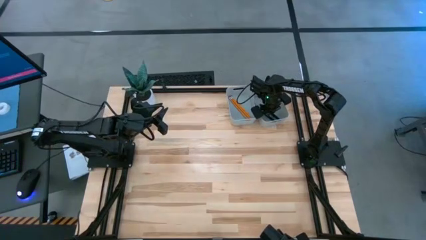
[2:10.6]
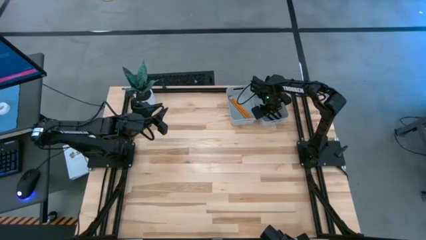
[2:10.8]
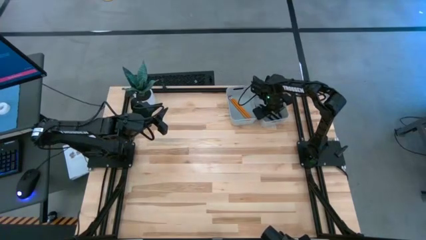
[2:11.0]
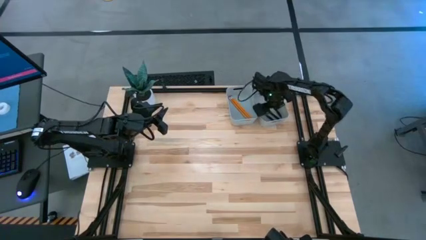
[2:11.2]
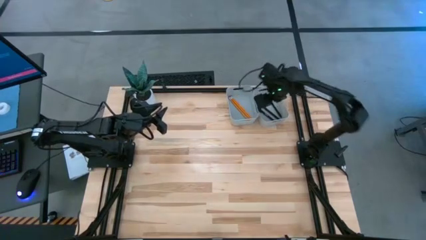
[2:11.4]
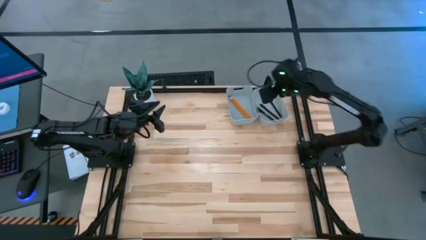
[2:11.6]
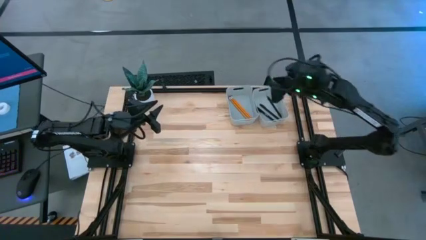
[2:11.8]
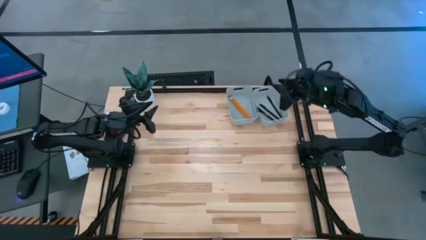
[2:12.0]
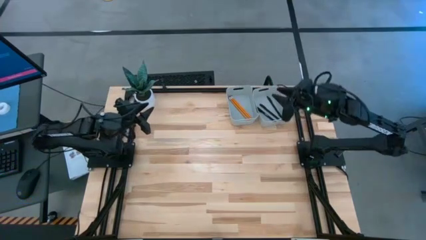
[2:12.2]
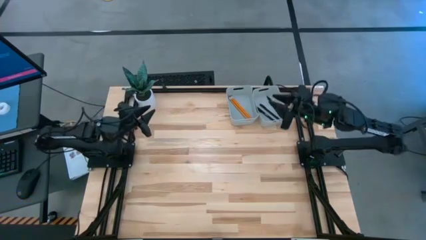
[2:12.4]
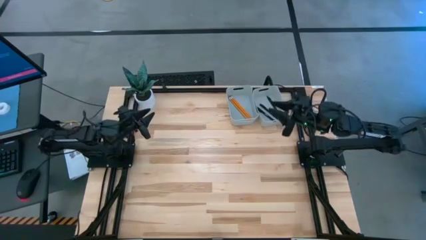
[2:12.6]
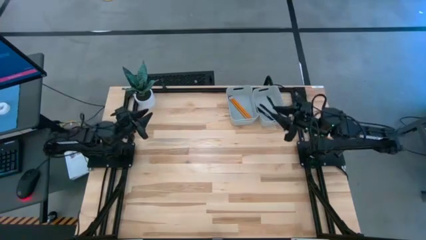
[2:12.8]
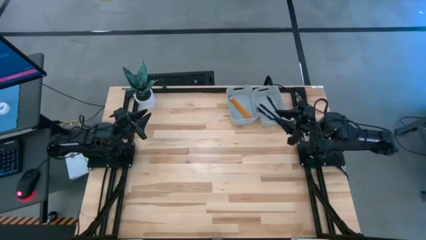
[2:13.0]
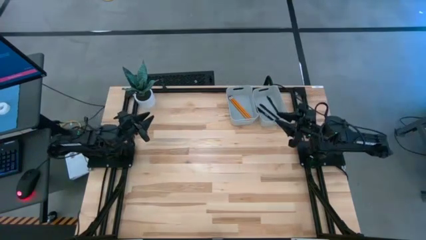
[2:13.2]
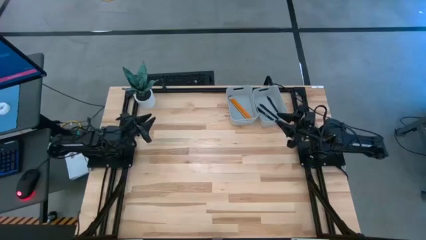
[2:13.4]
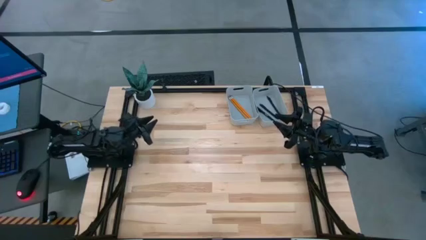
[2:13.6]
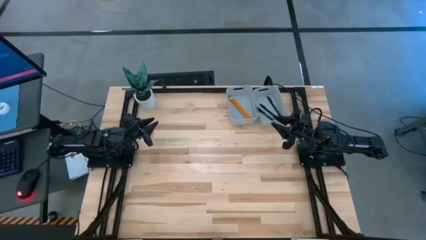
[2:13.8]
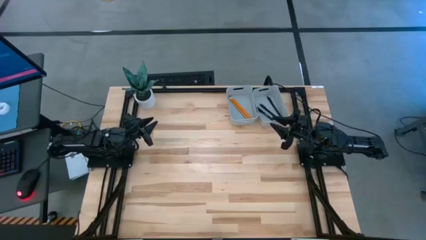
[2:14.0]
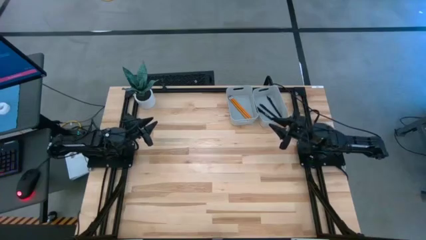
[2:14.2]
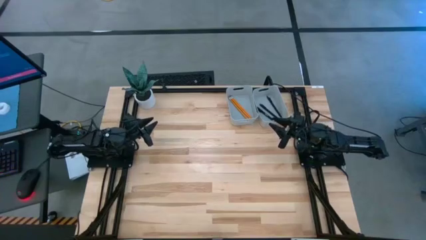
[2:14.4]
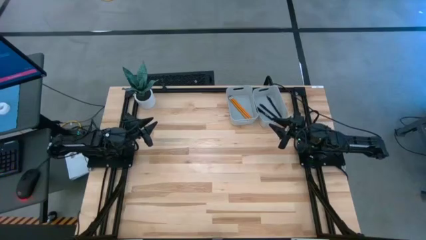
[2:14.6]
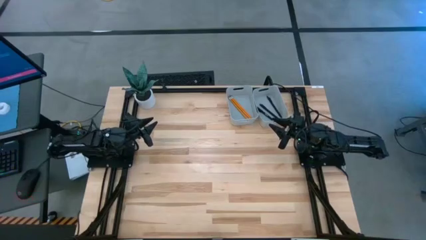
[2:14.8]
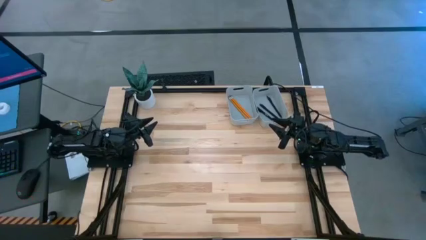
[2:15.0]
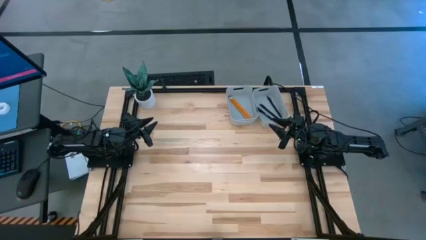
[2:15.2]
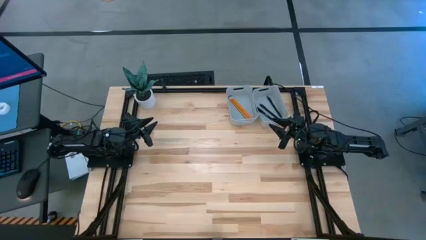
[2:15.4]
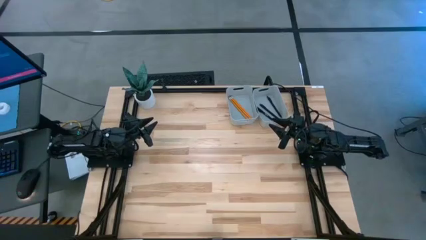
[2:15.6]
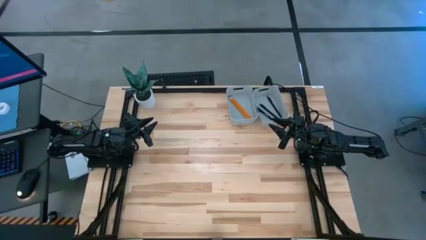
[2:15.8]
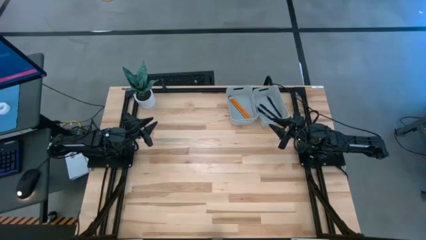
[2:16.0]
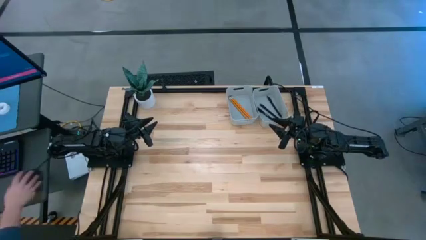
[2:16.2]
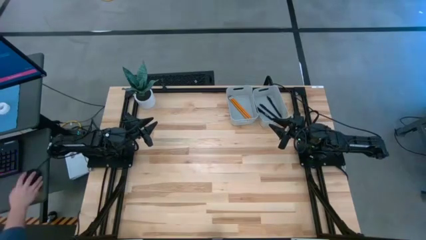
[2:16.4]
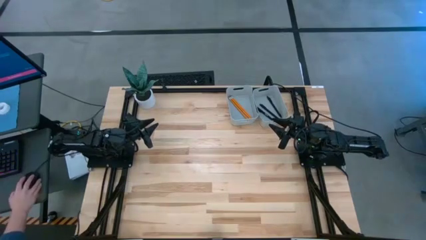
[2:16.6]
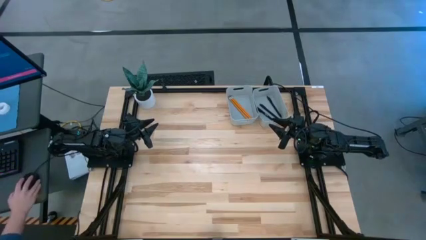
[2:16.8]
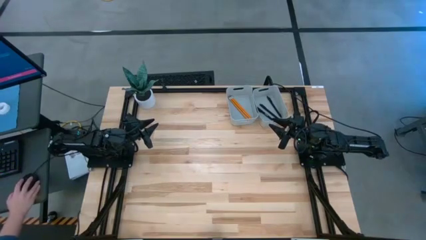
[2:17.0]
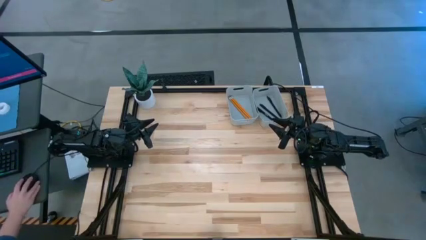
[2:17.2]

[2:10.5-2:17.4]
Task: Sort pens & pencils
Return to Home Position

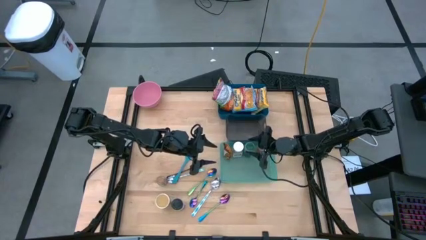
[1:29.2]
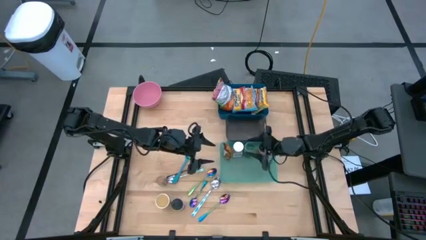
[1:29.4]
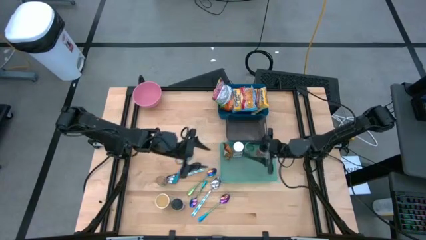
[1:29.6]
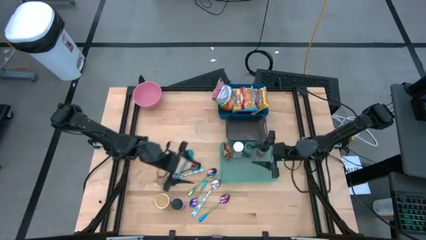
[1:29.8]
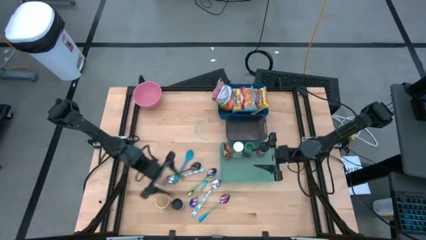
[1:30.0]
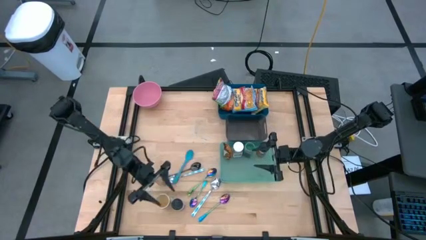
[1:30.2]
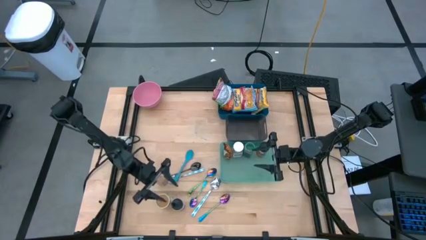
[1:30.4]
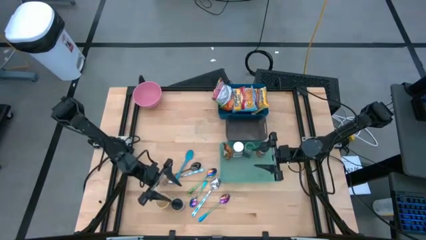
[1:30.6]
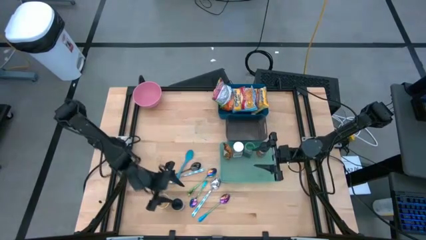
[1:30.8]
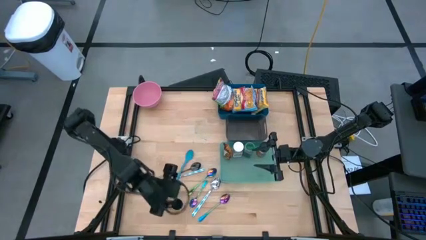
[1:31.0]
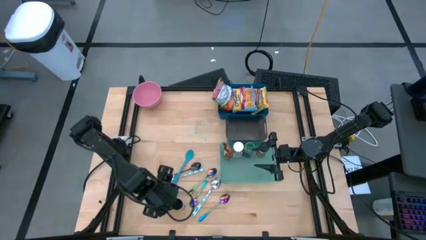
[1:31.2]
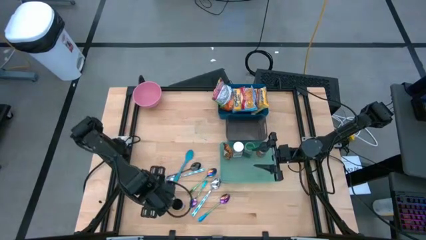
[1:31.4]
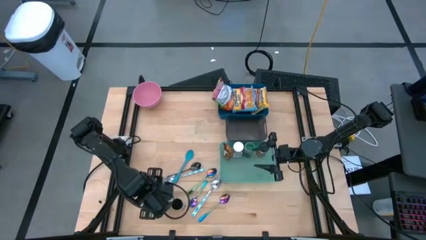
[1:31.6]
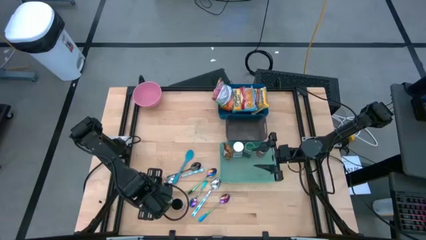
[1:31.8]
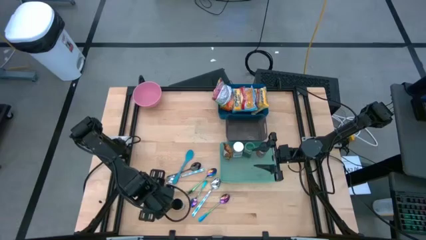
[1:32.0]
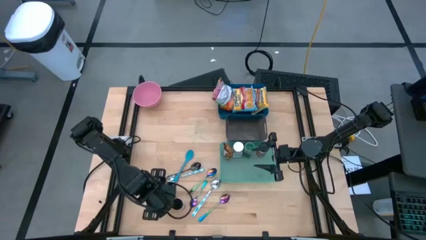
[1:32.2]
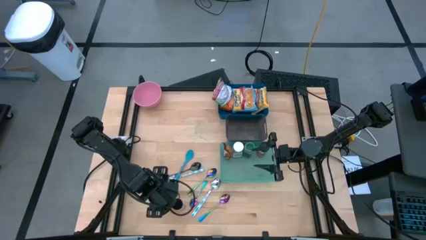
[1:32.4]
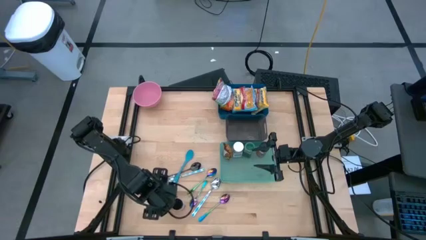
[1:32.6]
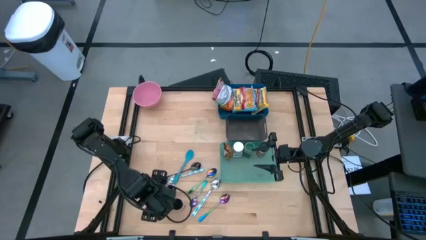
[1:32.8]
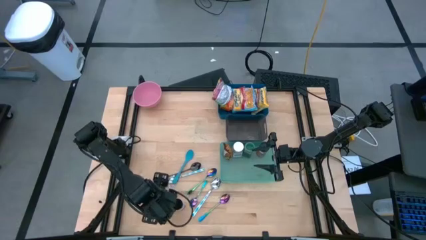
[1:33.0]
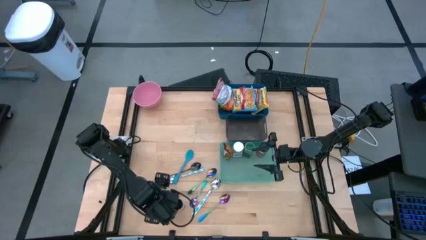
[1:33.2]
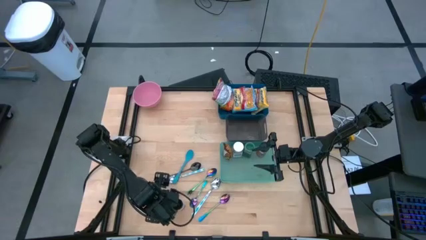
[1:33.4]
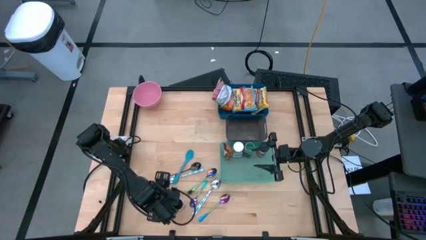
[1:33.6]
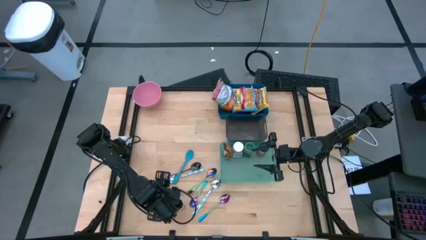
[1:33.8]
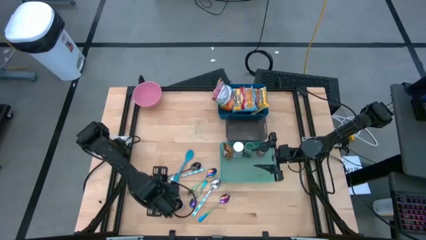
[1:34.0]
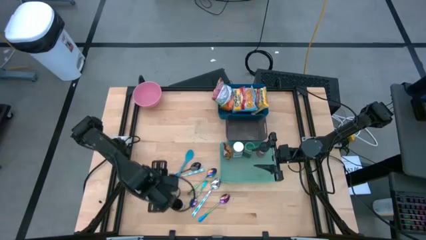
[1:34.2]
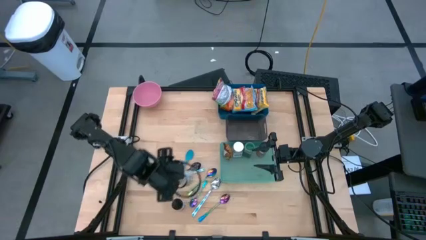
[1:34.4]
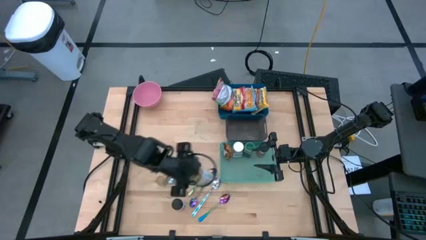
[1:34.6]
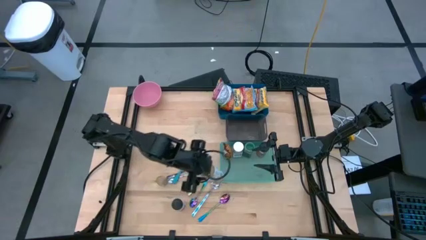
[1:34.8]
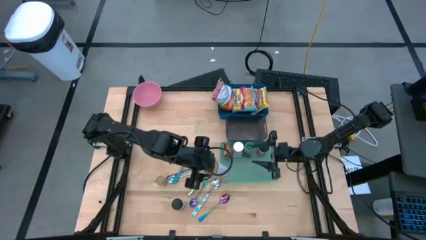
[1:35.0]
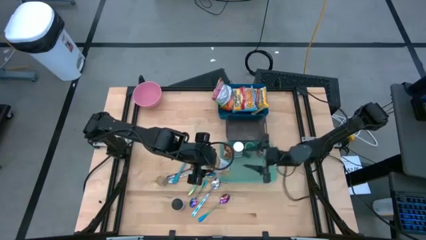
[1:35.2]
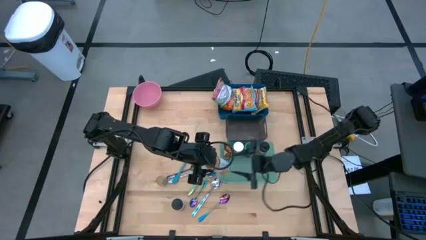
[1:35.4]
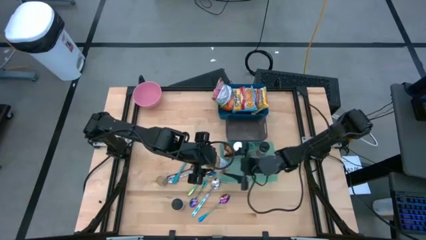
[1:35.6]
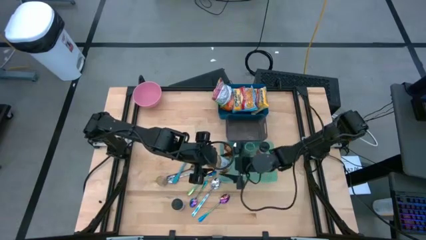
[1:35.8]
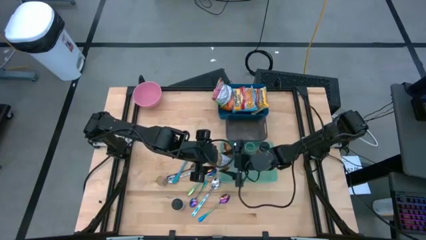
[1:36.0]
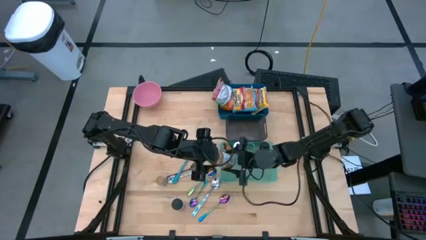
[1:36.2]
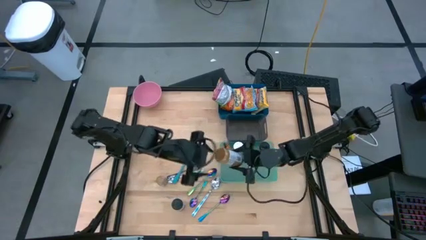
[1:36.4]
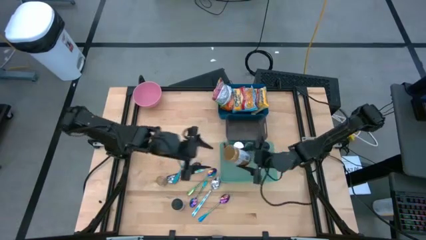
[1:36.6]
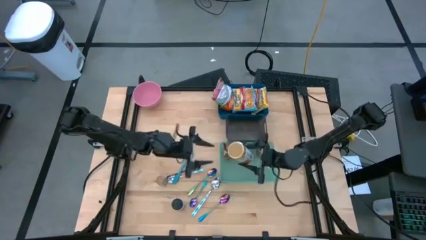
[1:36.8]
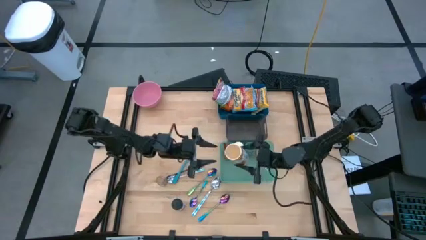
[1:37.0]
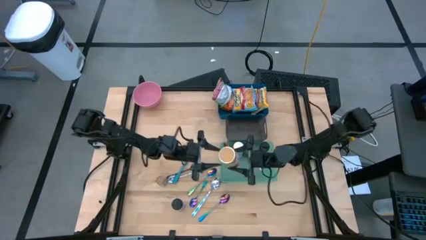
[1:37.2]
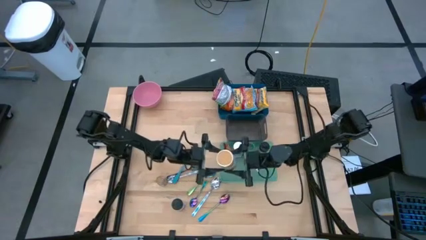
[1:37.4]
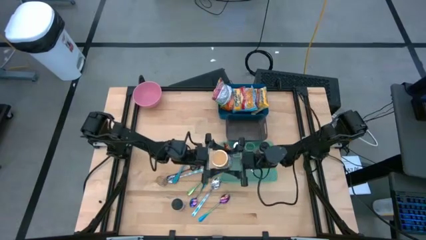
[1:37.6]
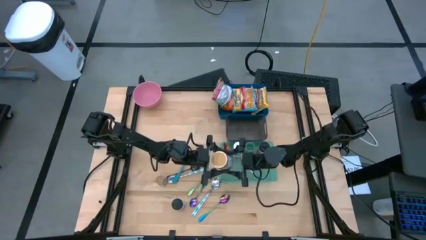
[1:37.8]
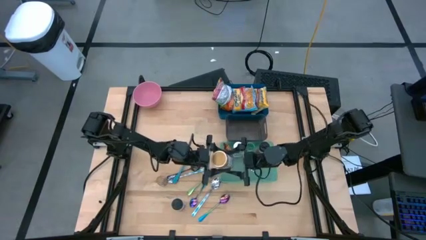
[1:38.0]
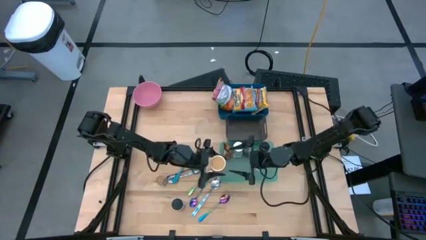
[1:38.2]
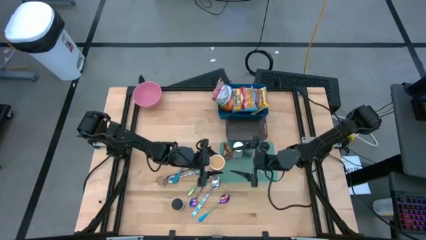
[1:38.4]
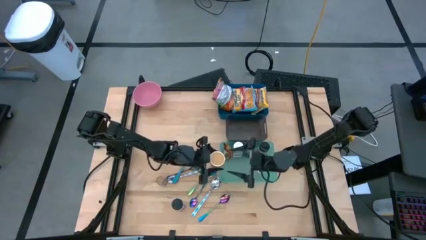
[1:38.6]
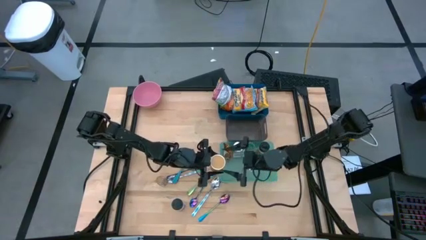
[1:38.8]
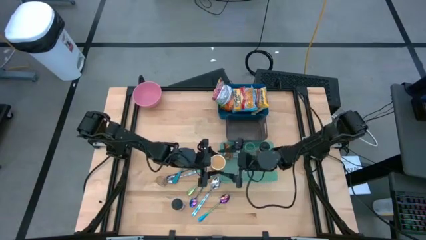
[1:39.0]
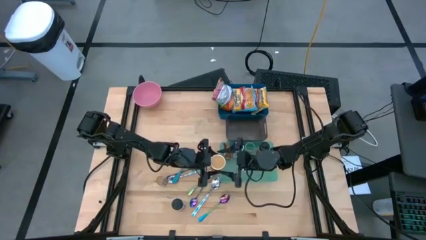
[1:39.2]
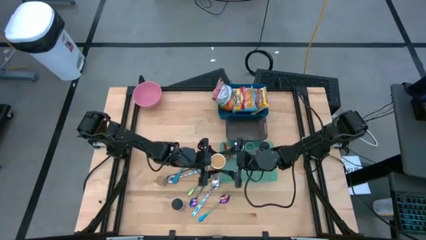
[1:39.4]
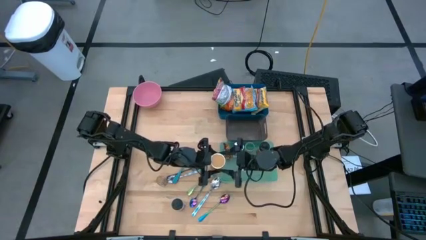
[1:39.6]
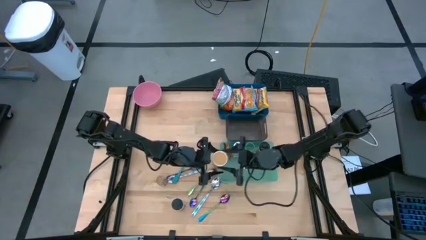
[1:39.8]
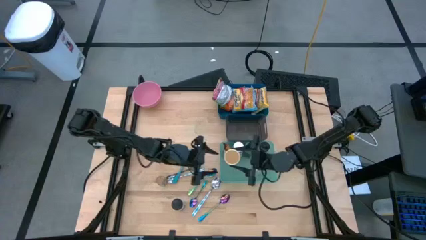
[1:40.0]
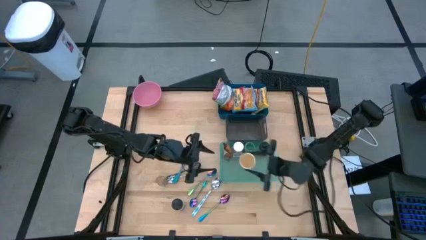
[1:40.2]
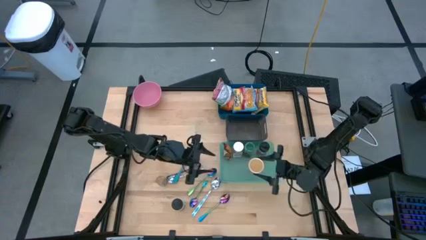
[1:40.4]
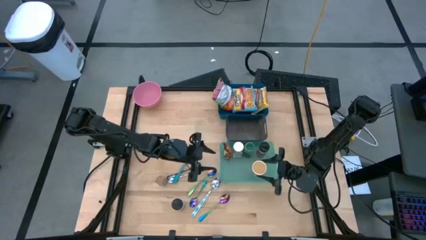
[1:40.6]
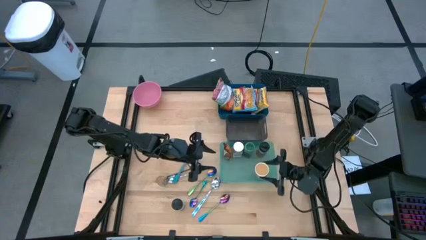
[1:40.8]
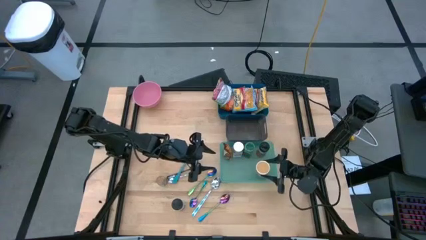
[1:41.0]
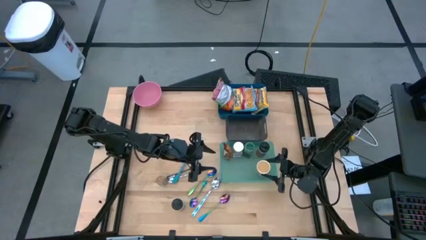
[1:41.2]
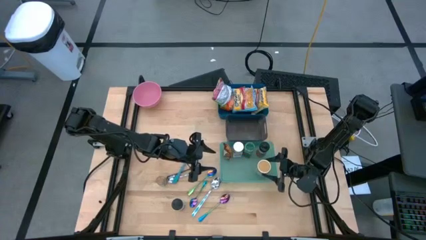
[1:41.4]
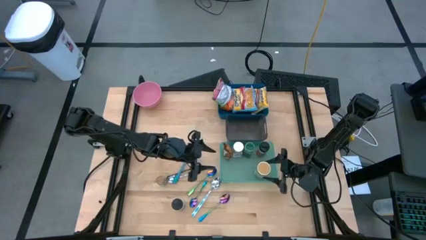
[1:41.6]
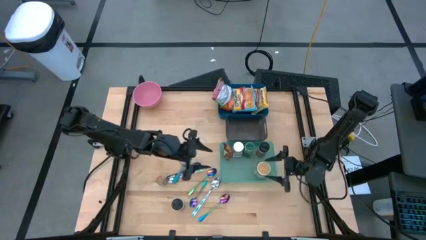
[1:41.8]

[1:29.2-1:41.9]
Task: Pick & Place Food Item
Put the gold seasoning bottle into the green bin
